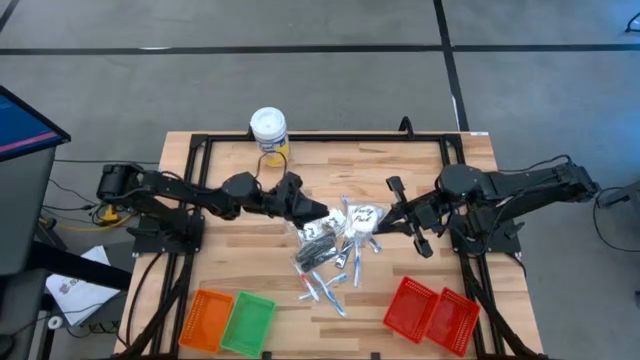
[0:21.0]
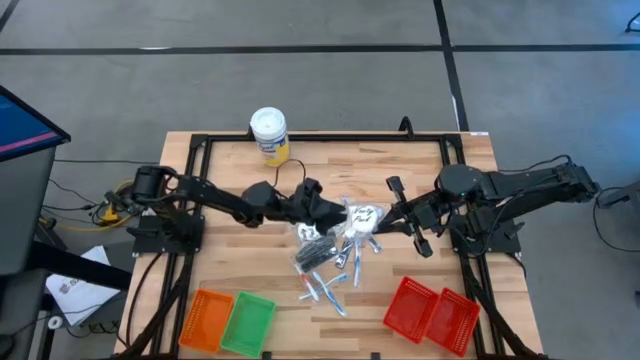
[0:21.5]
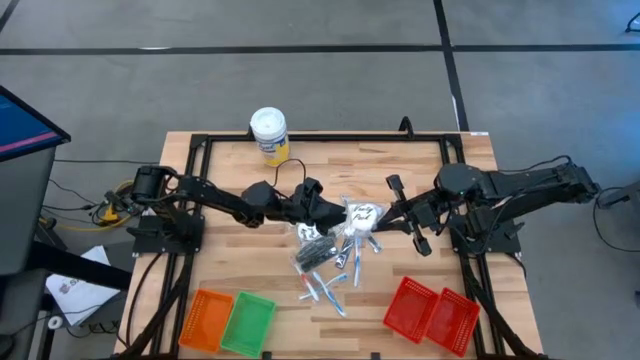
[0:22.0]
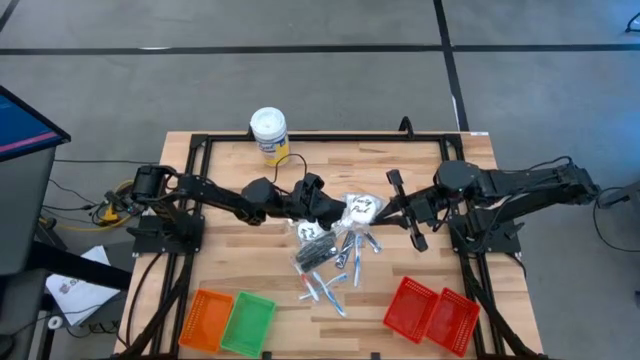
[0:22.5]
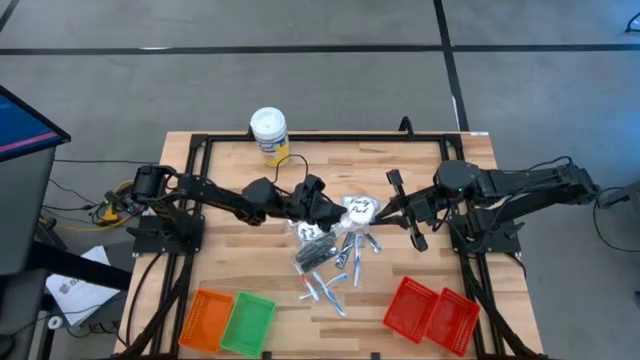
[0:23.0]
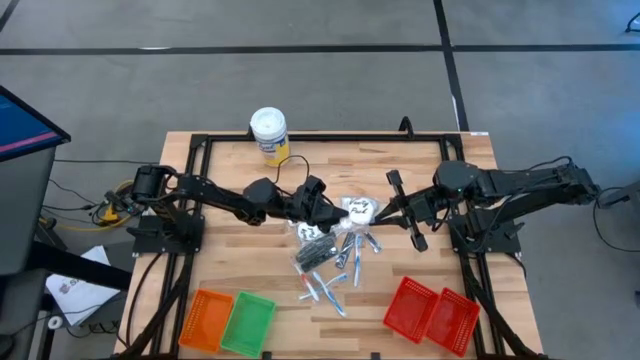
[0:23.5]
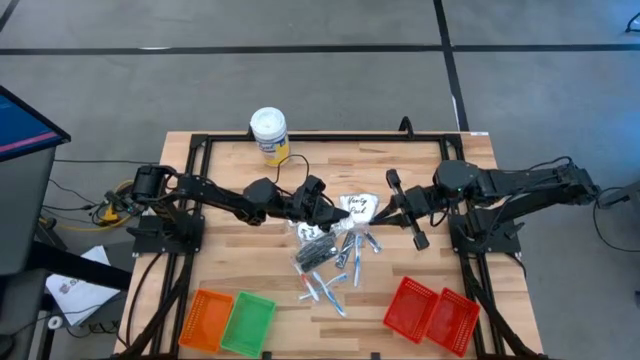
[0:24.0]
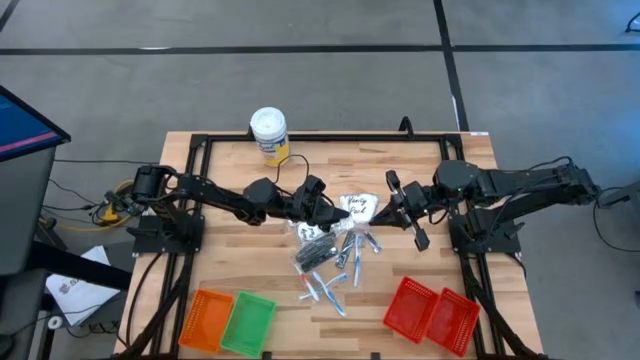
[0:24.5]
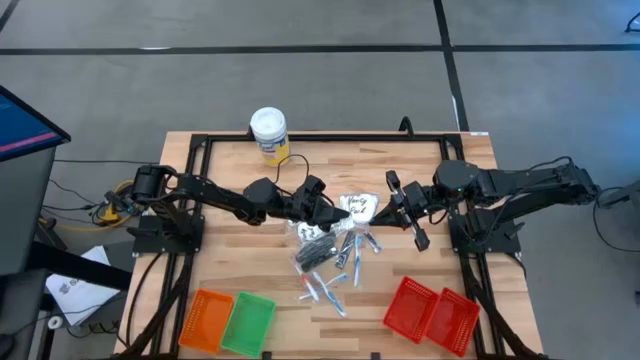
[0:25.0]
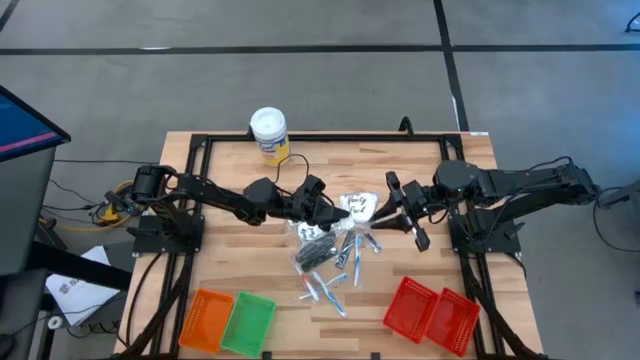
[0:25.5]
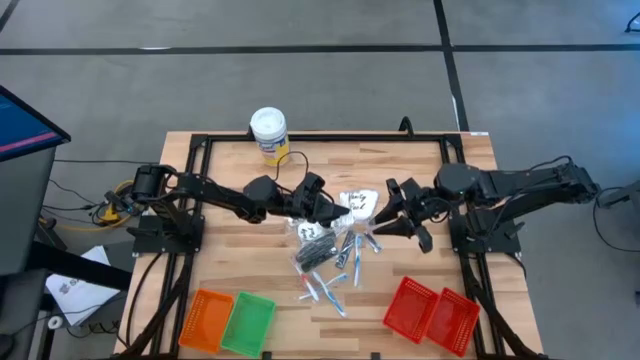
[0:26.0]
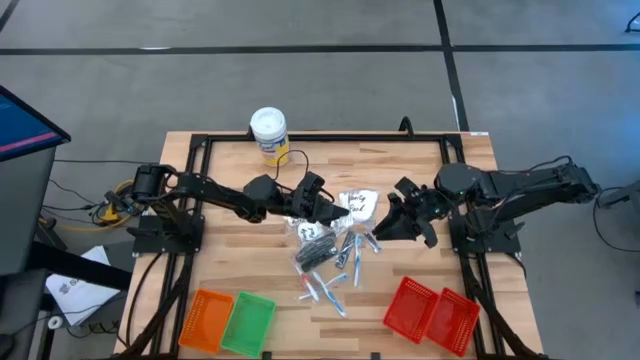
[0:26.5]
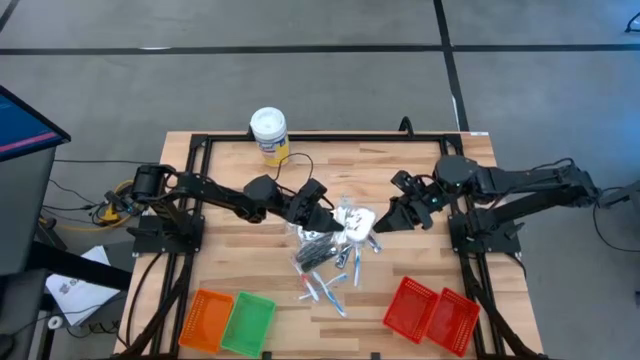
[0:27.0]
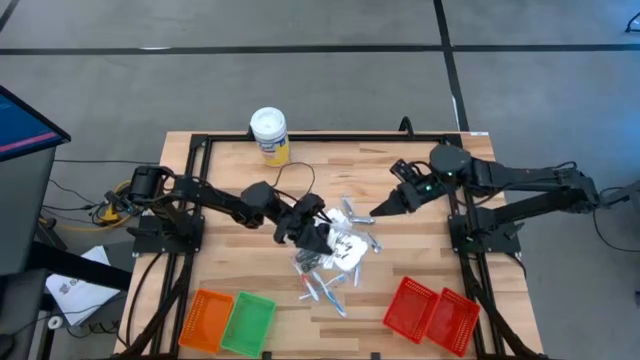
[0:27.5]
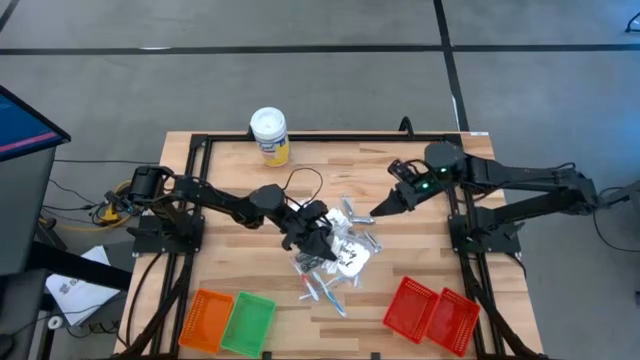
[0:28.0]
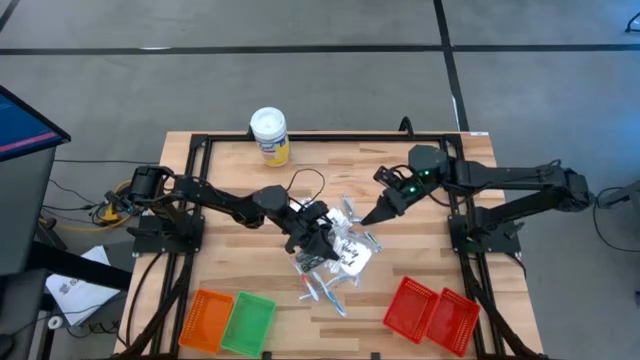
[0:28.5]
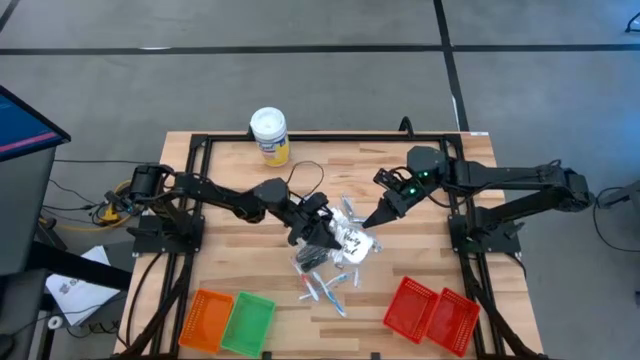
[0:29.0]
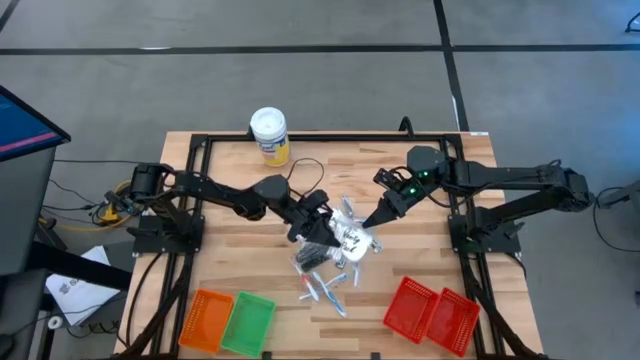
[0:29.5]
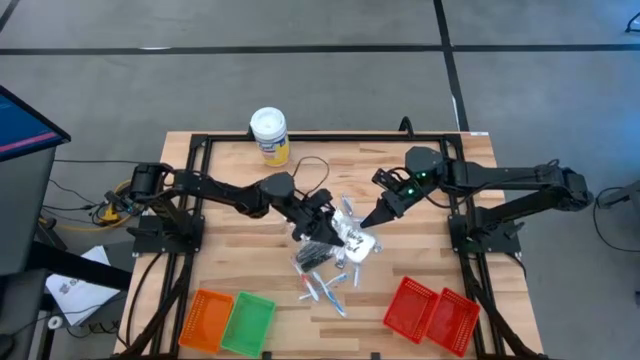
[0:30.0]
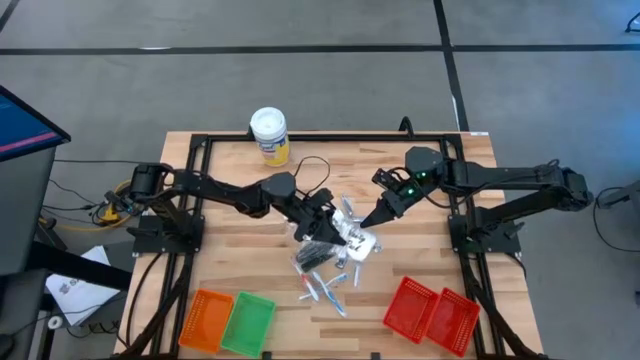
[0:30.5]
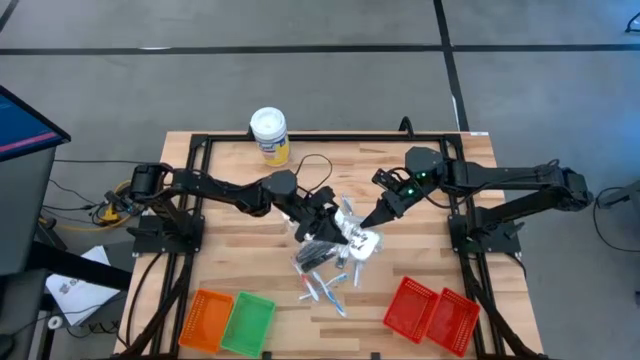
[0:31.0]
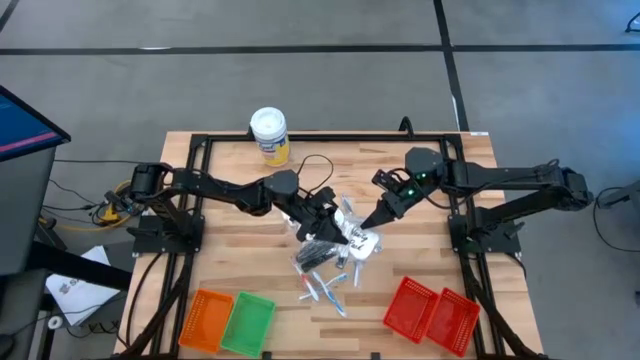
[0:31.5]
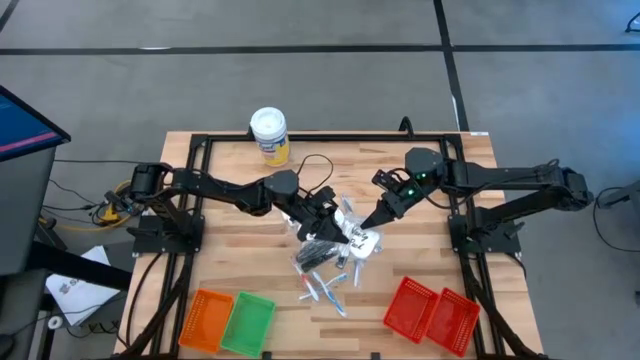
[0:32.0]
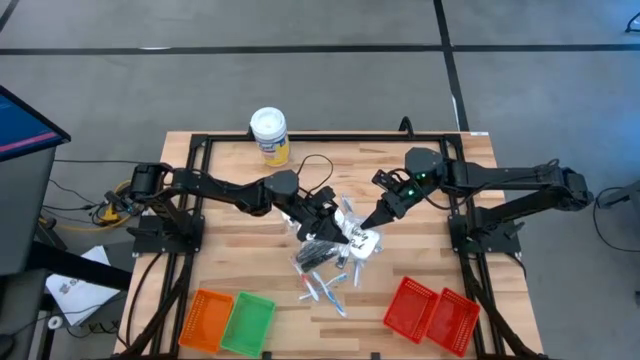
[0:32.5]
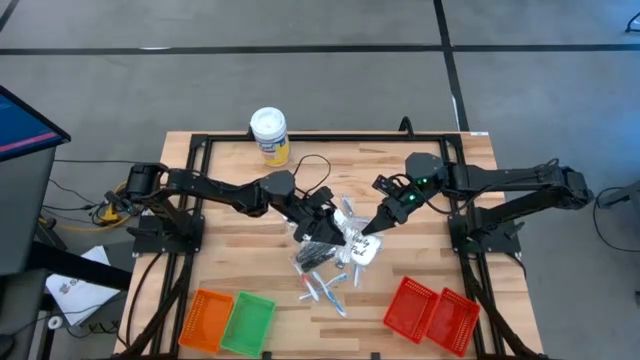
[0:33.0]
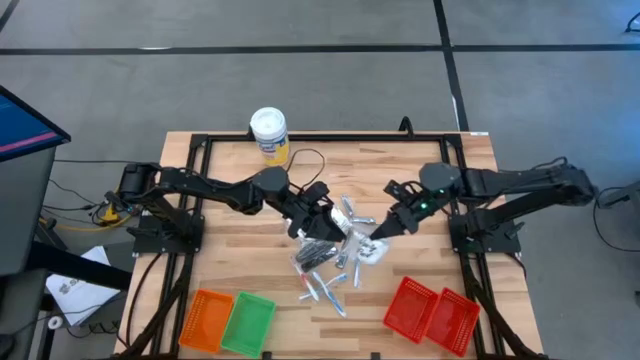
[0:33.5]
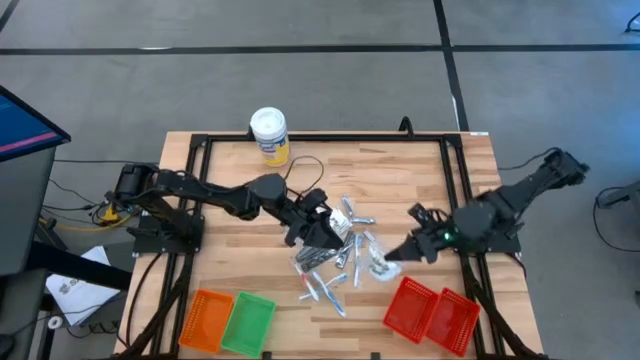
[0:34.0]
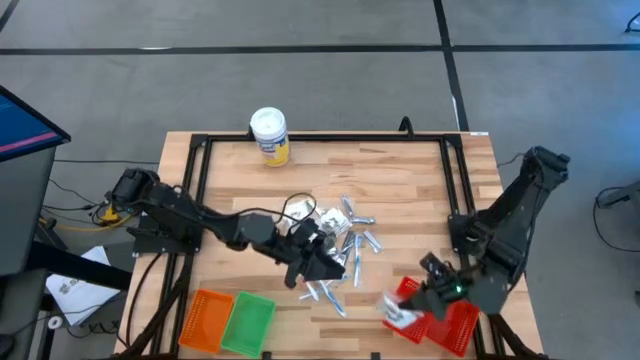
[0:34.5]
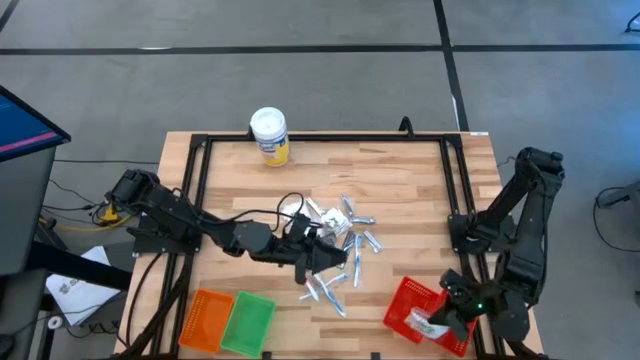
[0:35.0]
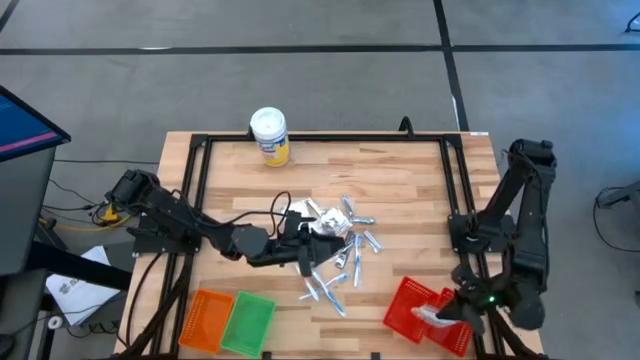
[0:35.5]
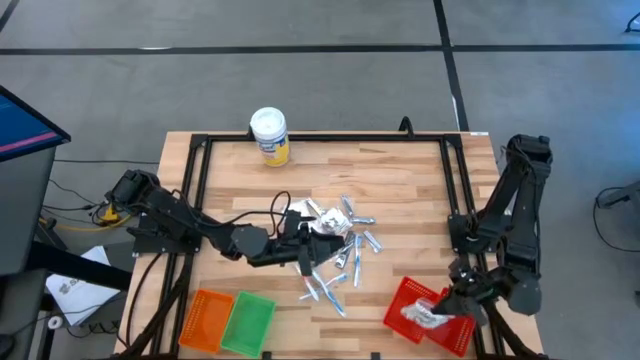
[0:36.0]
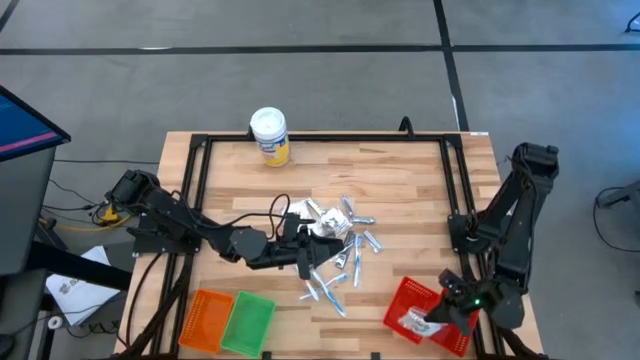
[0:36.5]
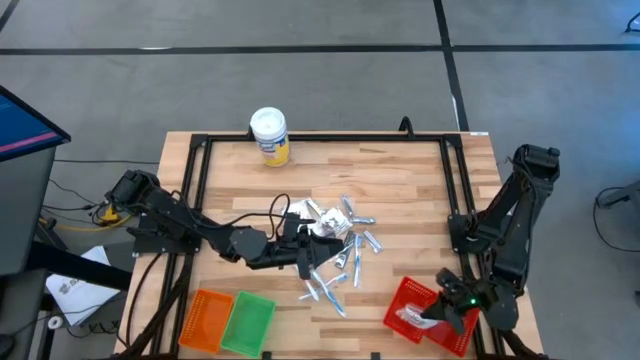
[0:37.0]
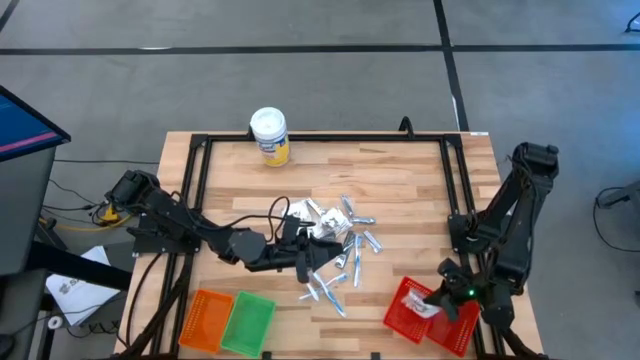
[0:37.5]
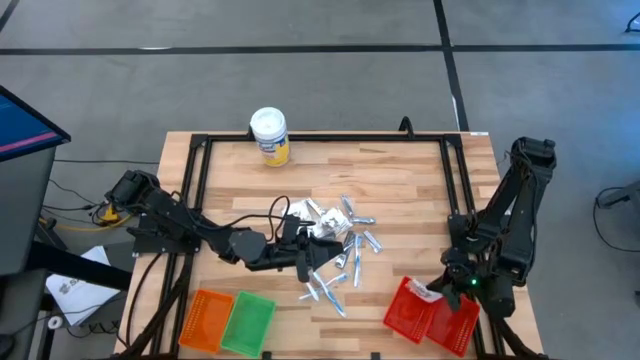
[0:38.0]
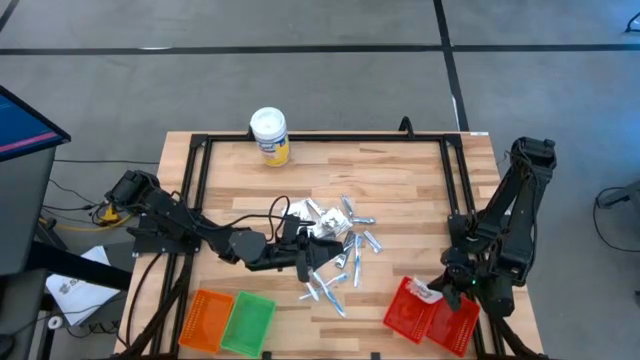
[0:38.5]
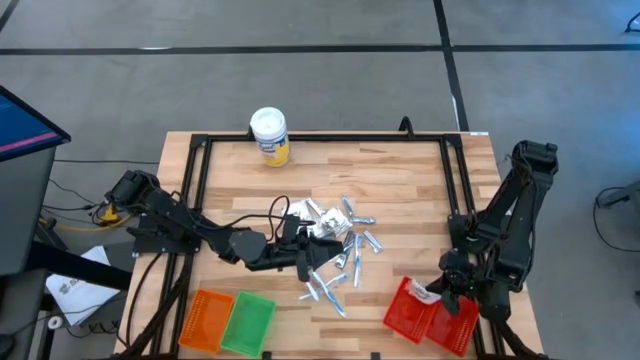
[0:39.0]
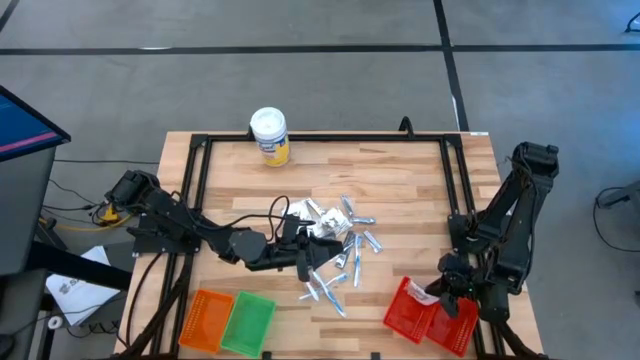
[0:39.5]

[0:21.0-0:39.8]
Task: Pick & Place Travel size toiletries
Put the cotton pods into the left red basket
